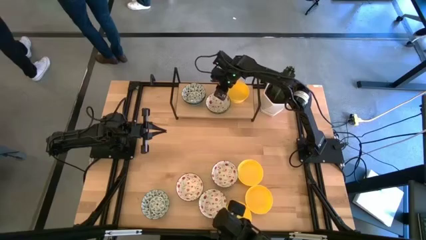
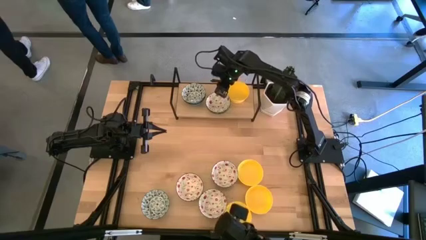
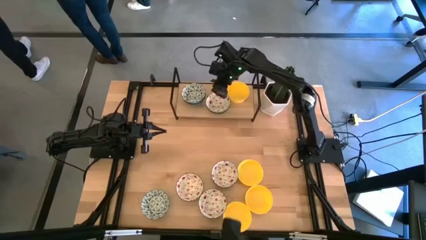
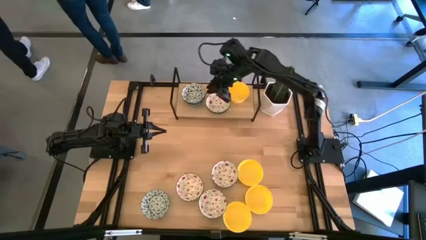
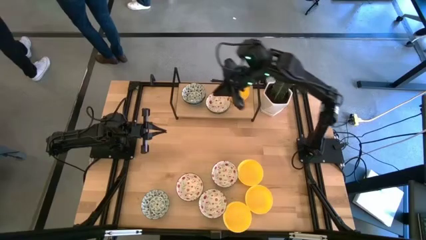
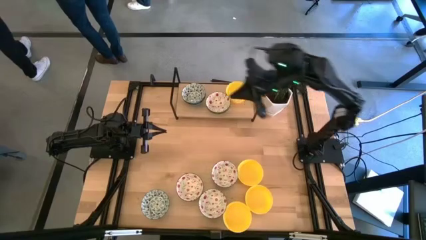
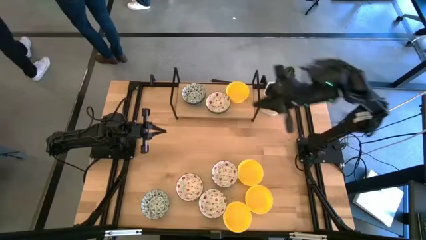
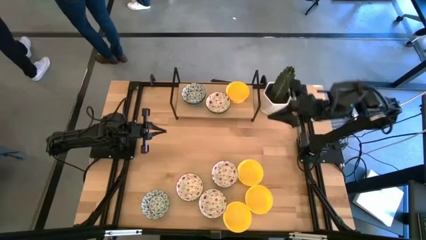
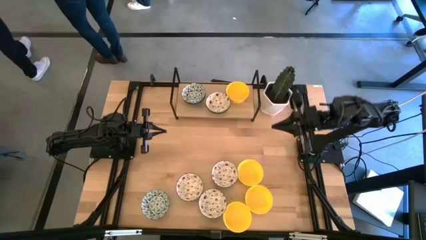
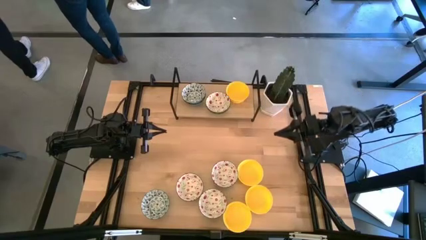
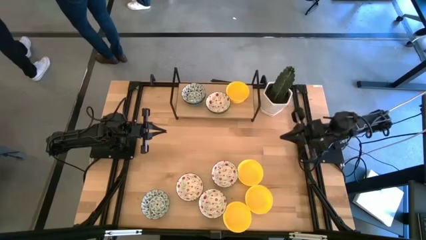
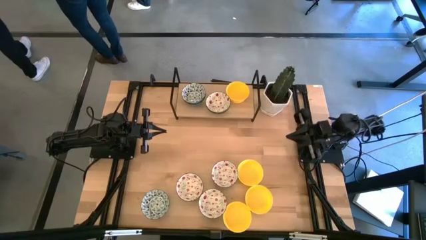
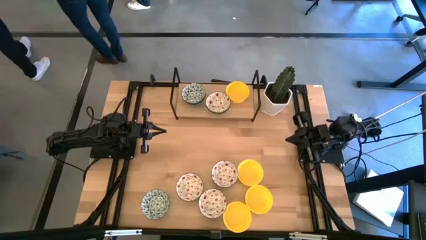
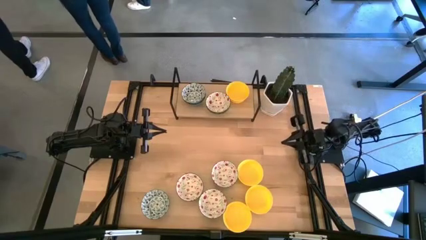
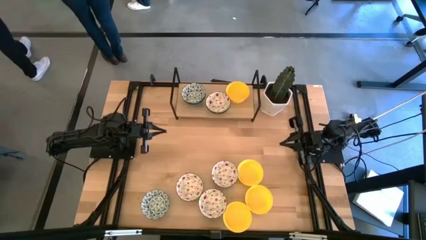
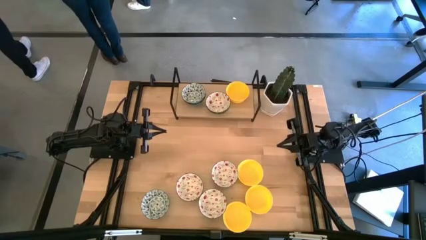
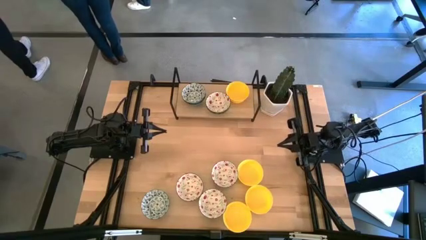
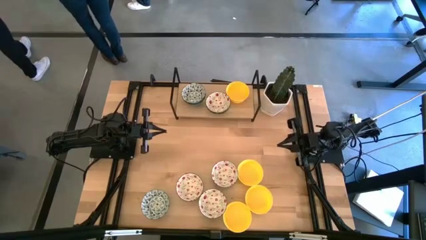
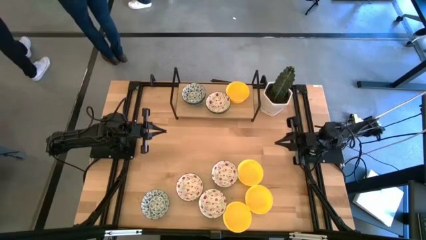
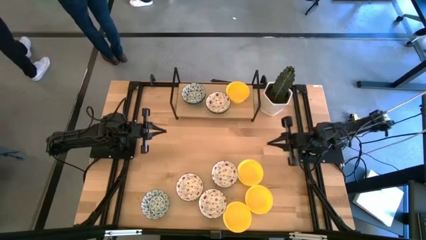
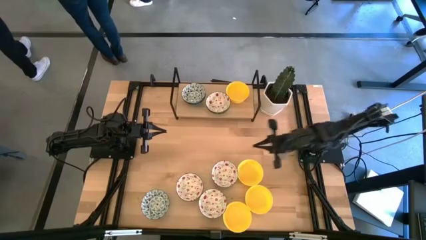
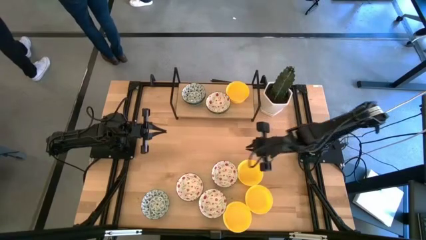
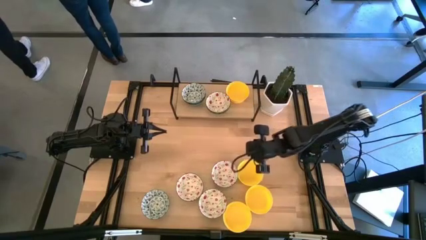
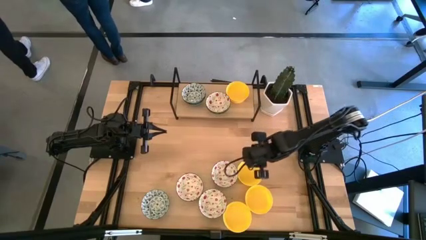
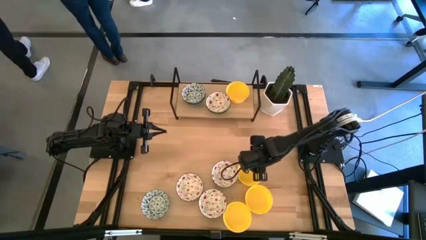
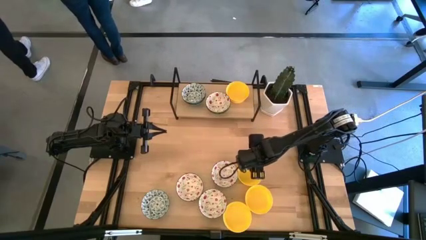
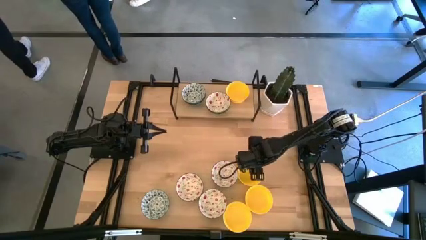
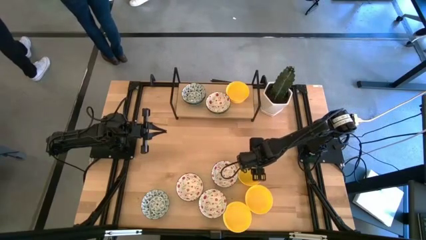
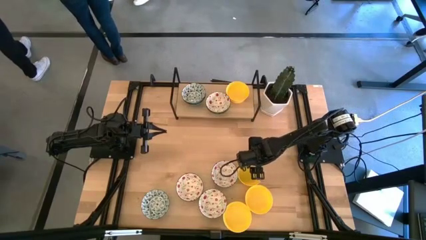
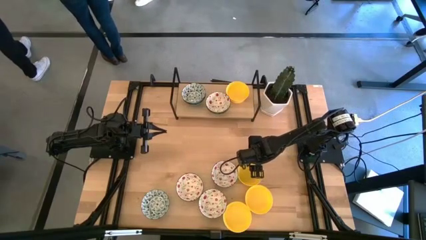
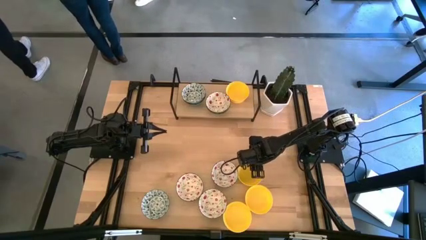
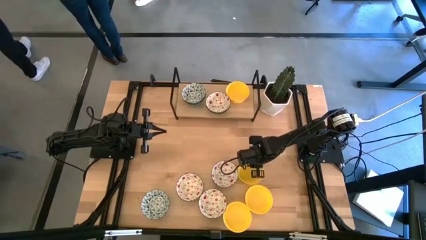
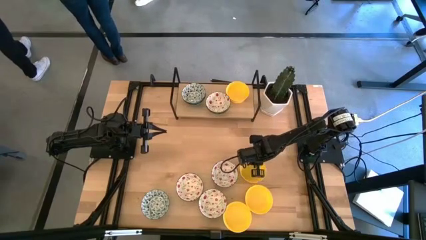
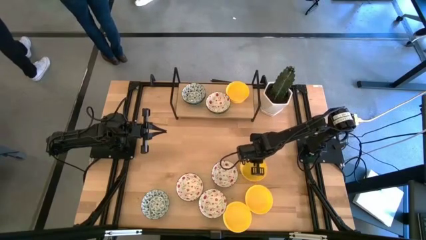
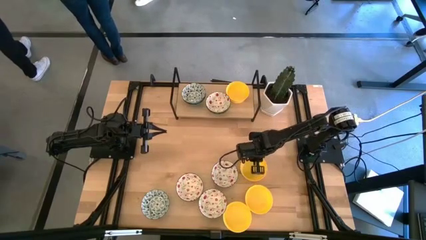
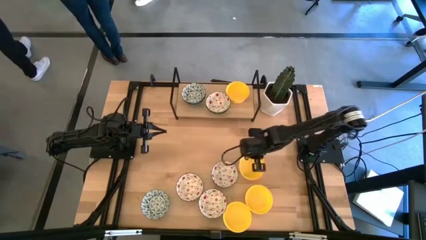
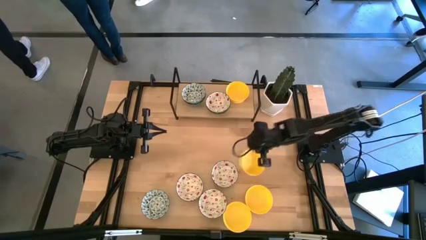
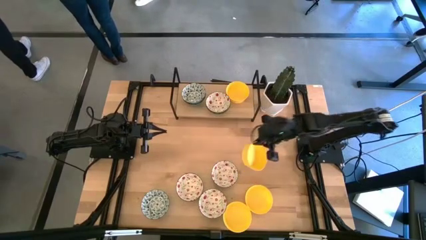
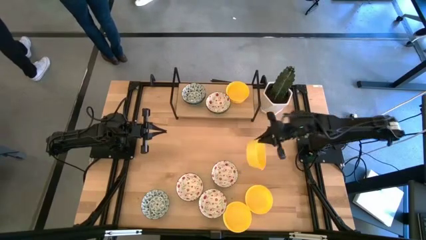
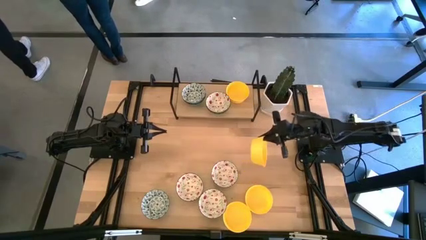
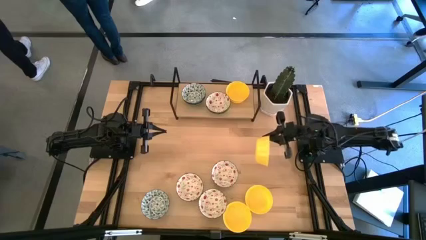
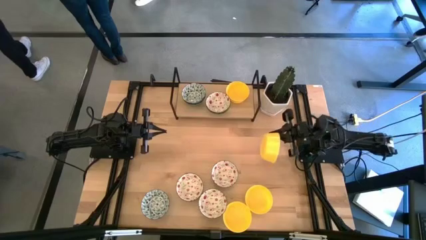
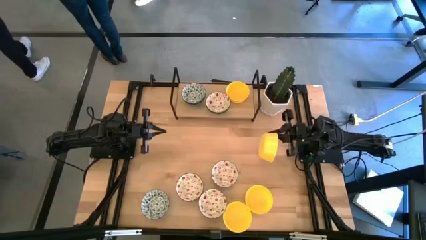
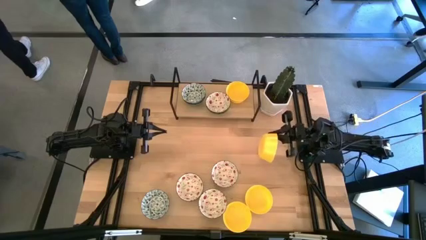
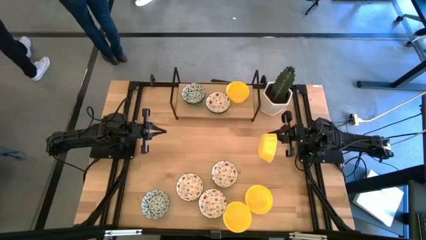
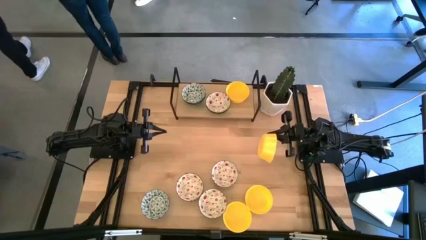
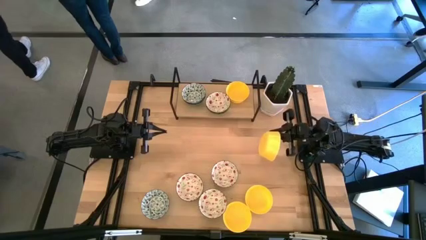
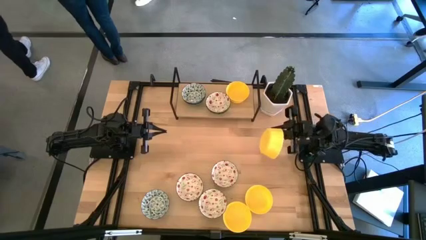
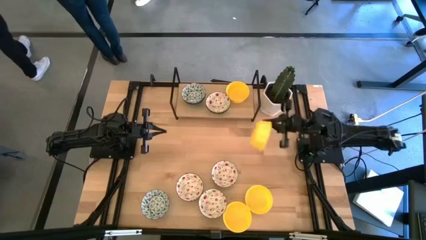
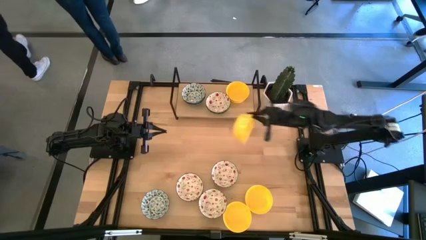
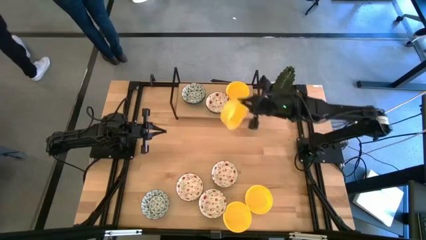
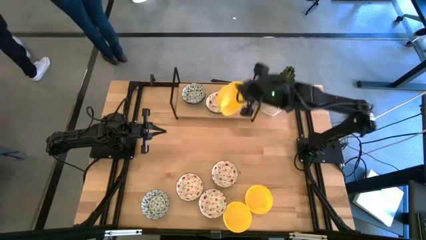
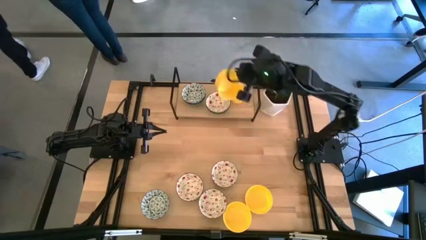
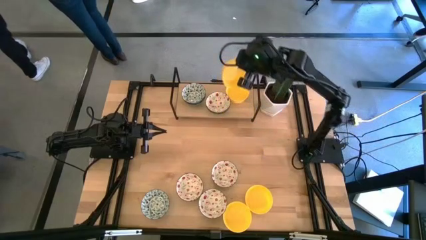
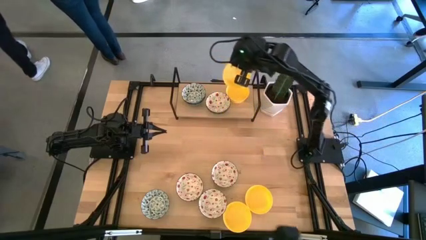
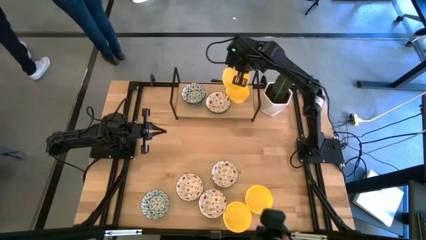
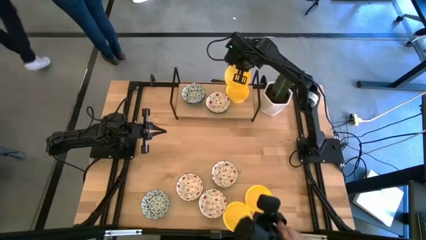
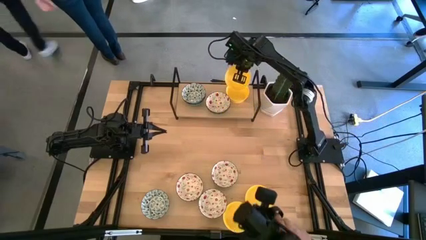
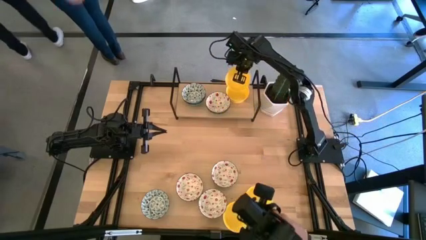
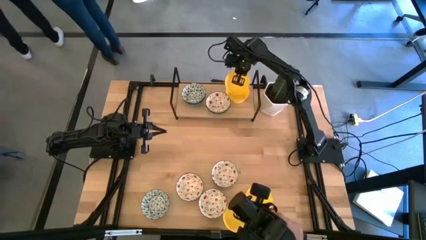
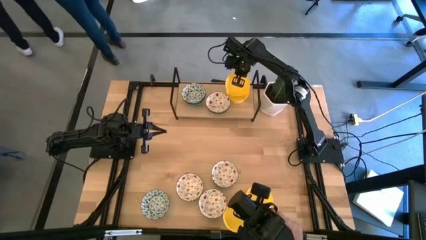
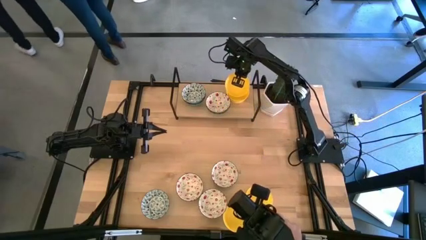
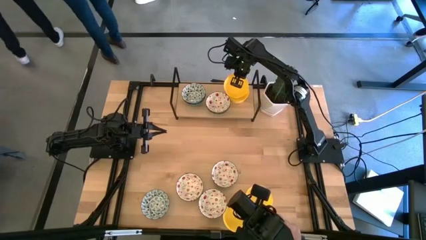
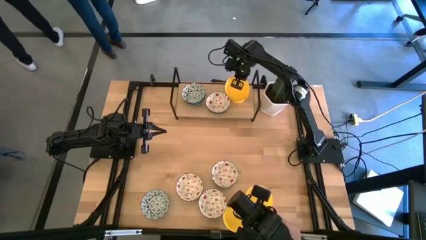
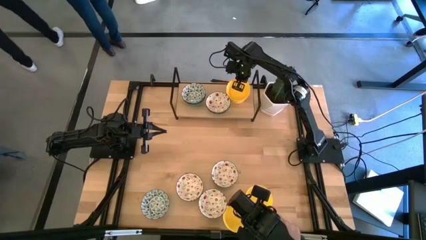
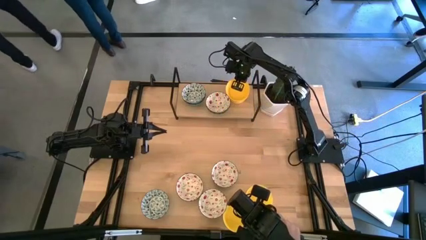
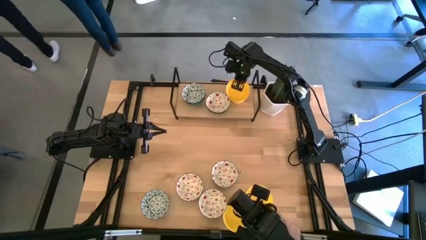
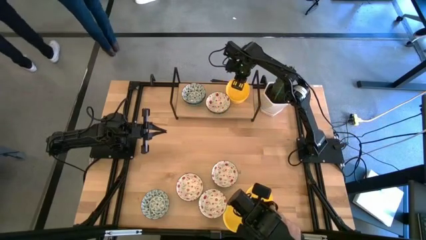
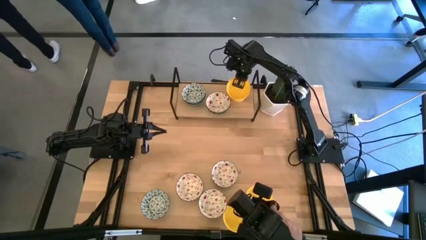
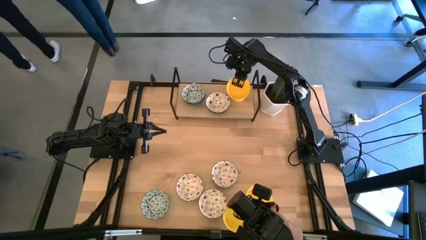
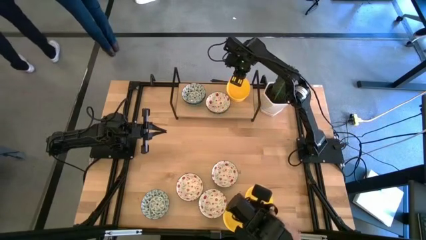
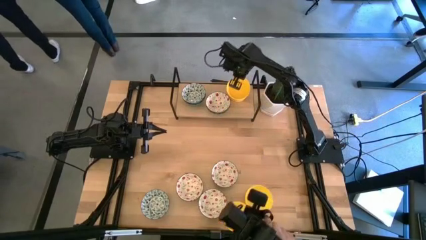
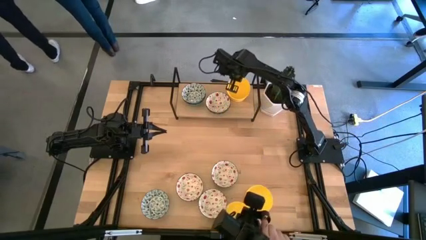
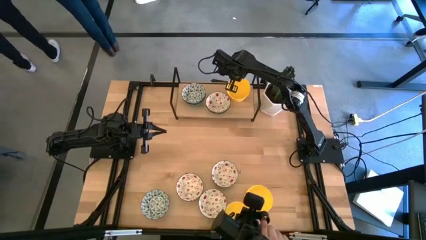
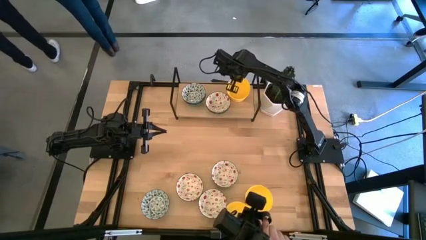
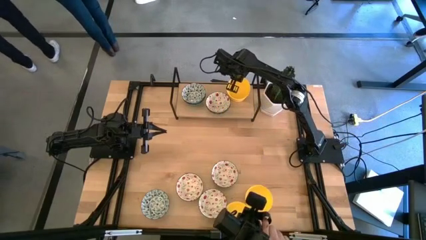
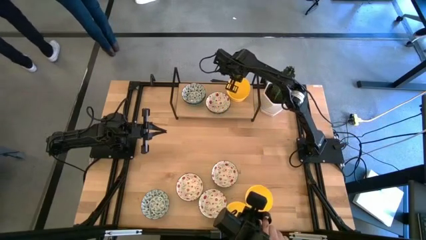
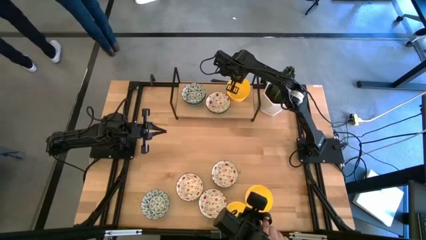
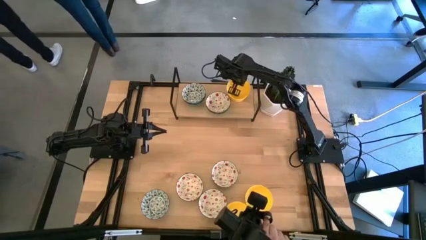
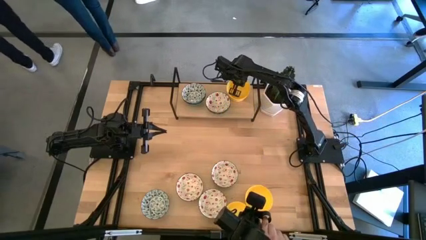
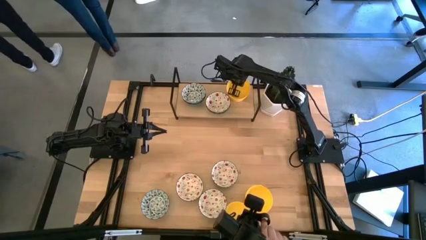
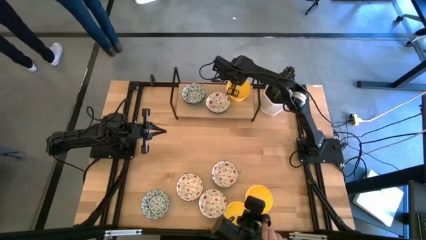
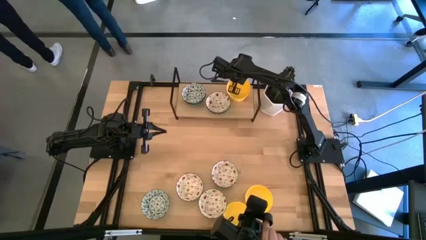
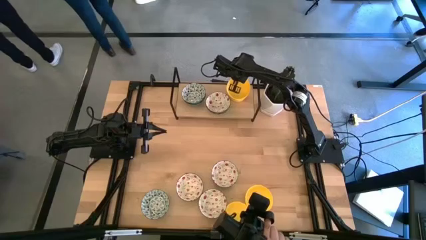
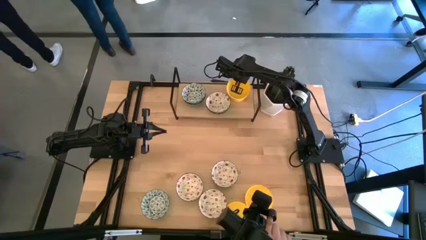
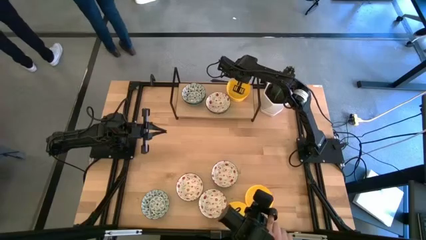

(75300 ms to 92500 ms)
Task: Pick & Place Mini bowls
Stack the yellow bowl on the yellow bowl on the shelf
